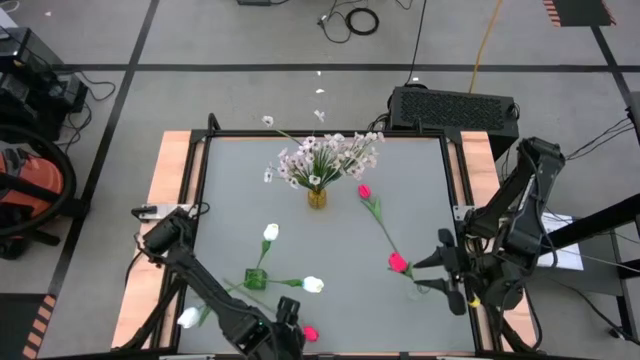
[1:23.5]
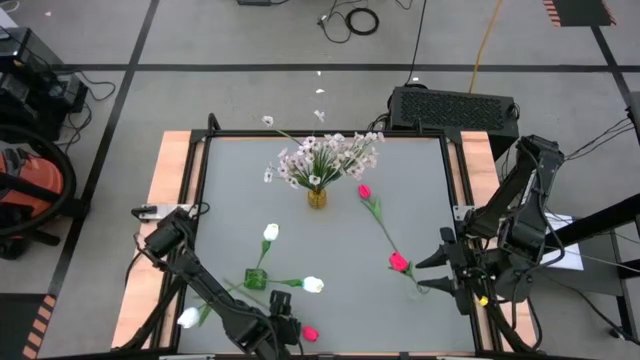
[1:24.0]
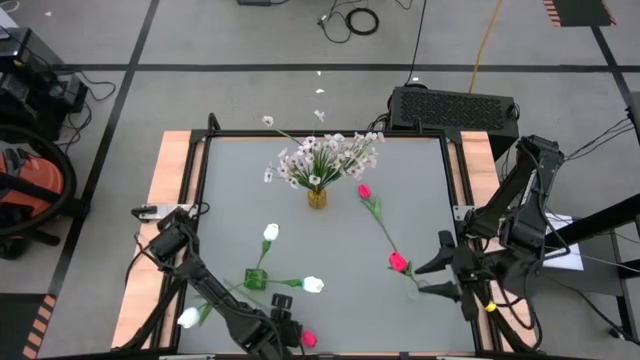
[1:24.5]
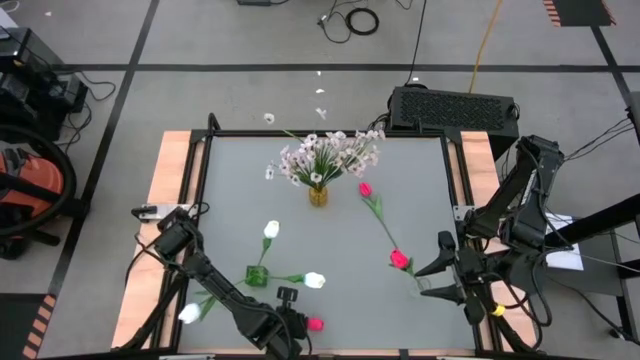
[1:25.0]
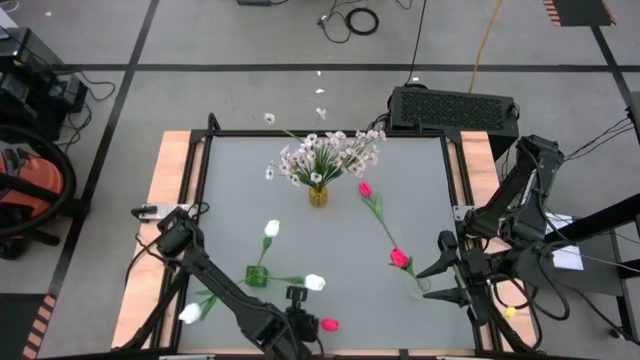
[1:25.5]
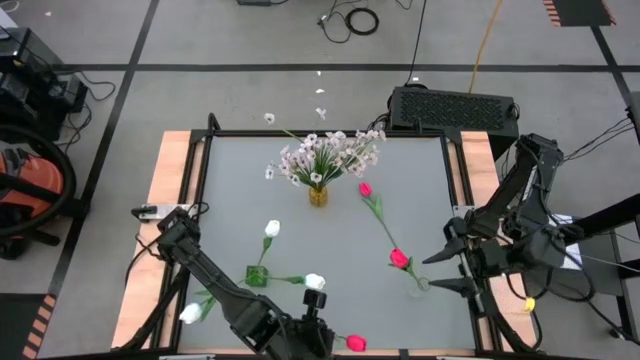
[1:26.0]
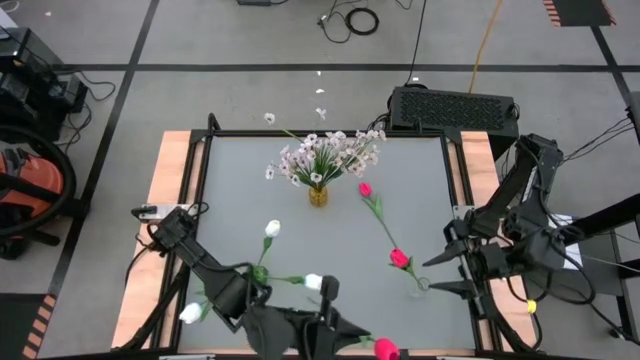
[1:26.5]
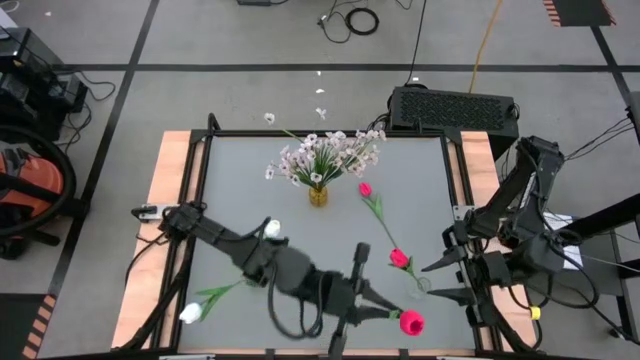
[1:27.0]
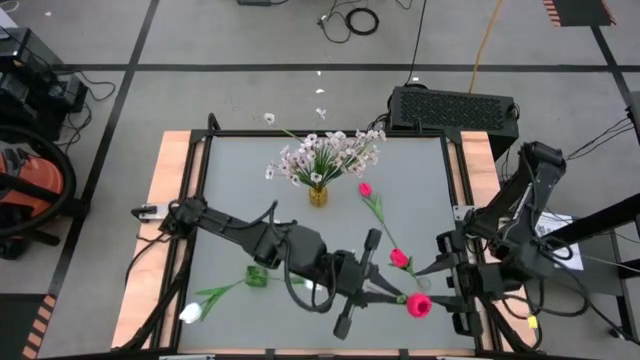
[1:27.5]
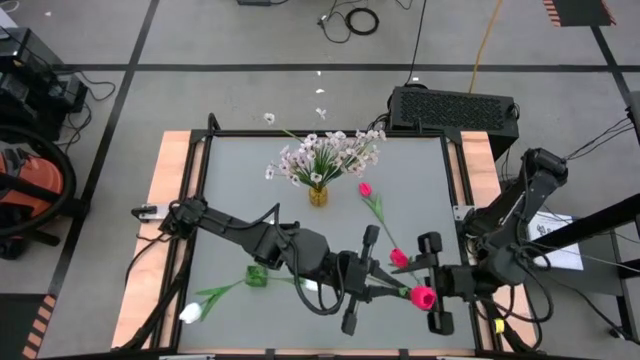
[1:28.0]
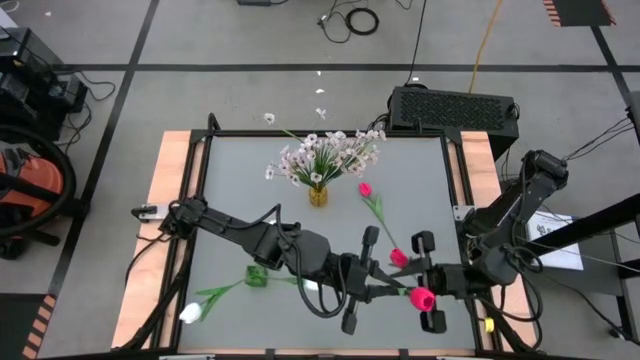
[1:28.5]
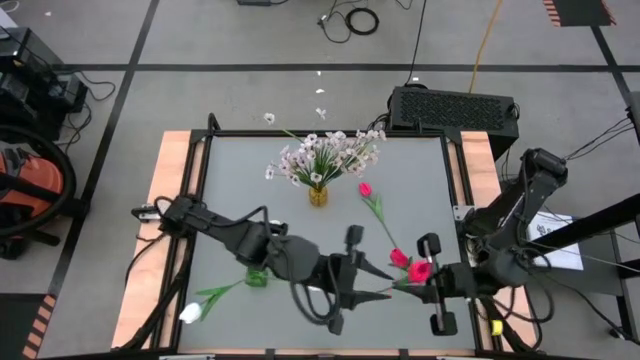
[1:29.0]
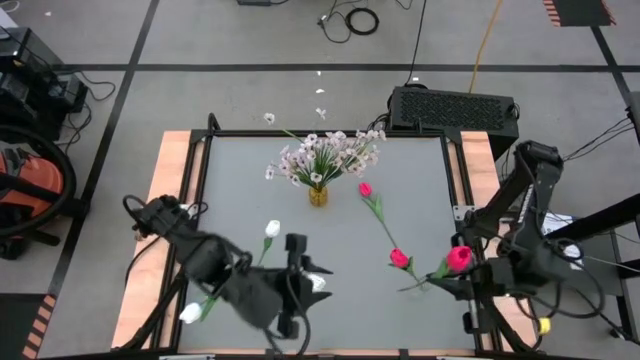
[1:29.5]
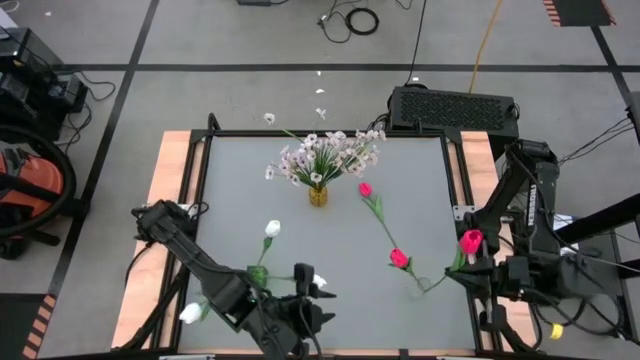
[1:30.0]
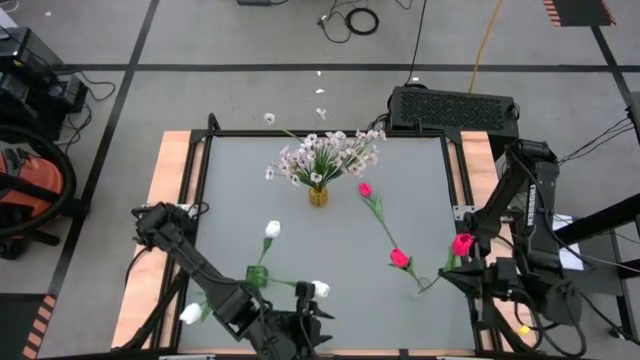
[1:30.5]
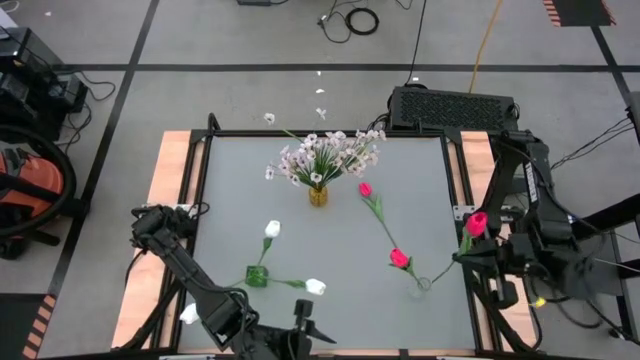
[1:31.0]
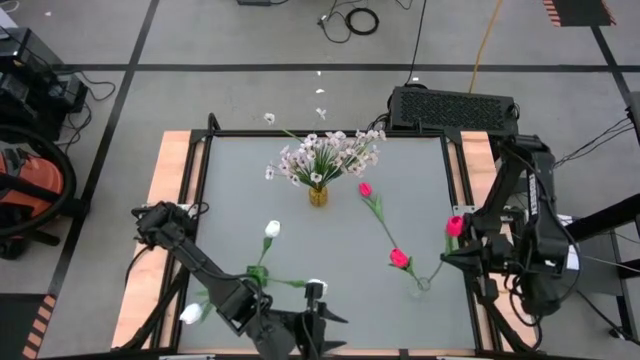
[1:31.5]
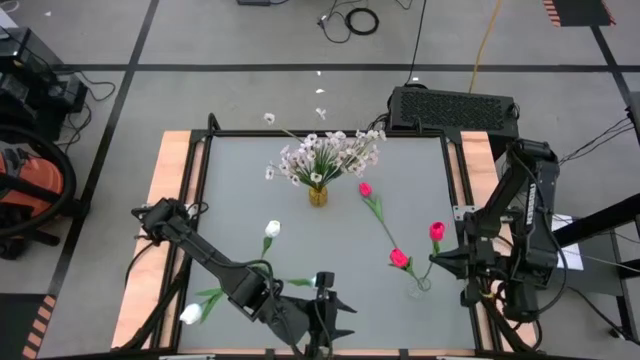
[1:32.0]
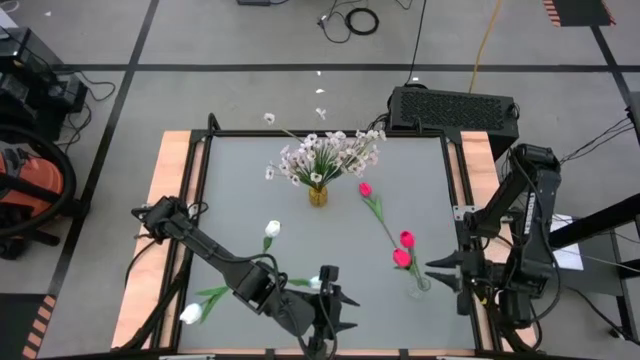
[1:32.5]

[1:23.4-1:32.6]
Task: Sort flowers into vase by color
Put the bottom red flower into the transparent vase

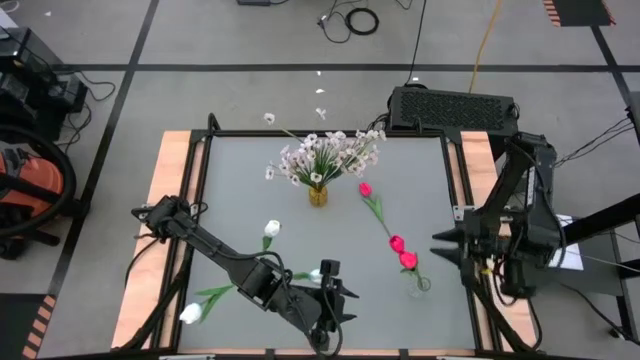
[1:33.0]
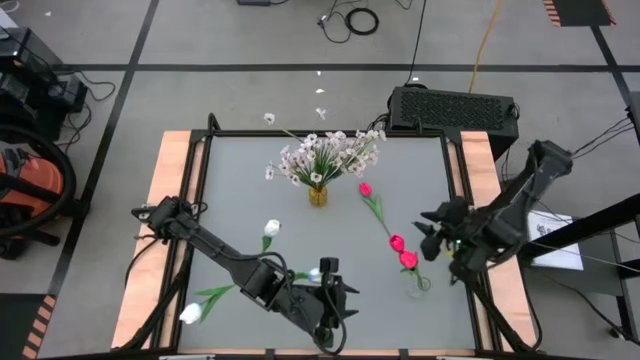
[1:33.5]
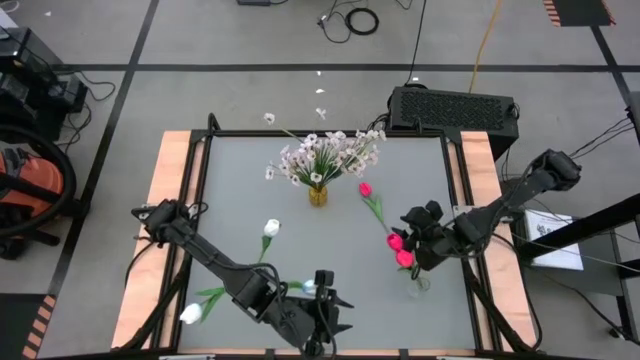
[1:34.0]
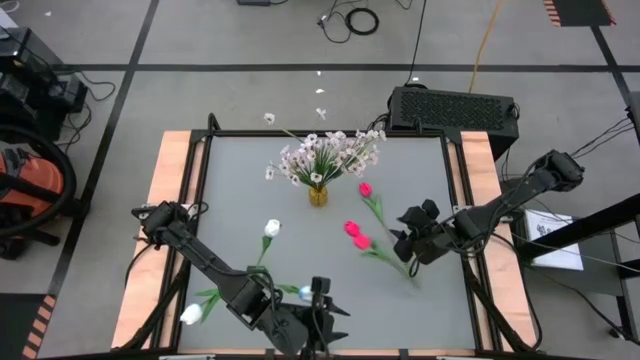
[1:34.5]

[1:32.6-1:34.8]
Put the red flower into the transparent vase

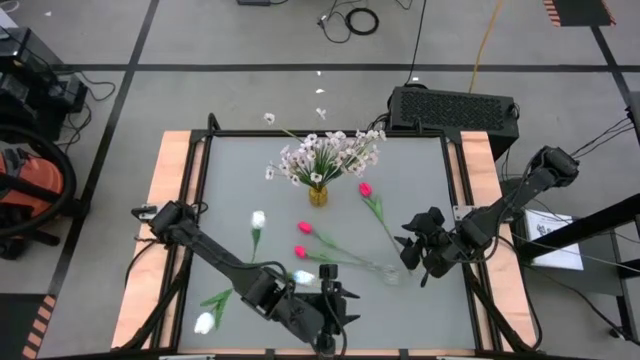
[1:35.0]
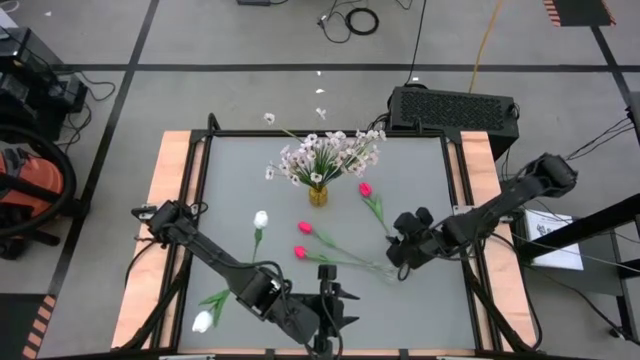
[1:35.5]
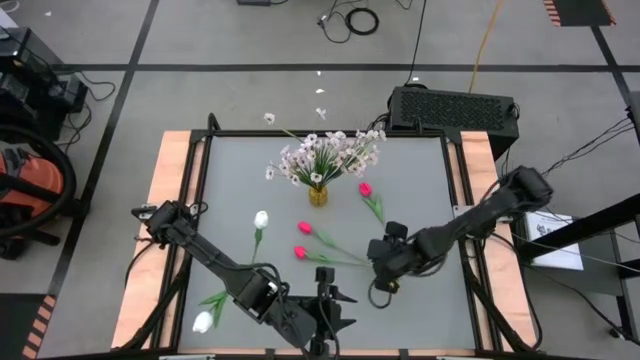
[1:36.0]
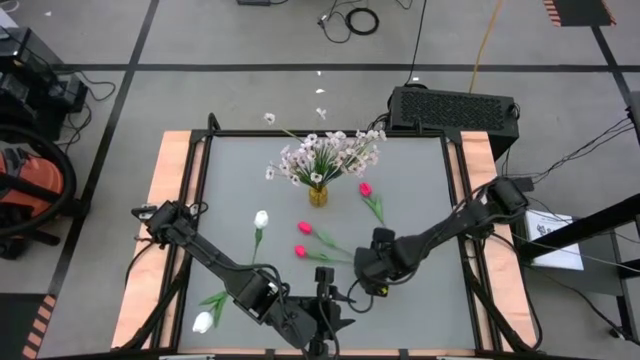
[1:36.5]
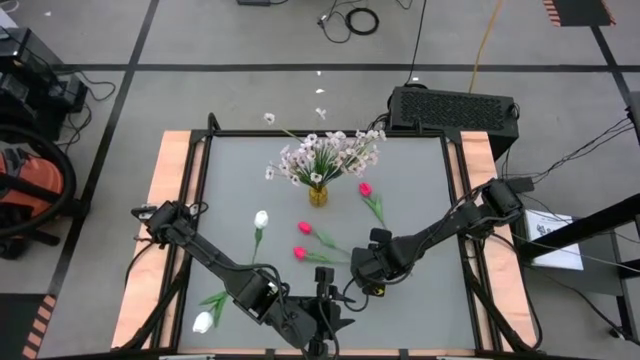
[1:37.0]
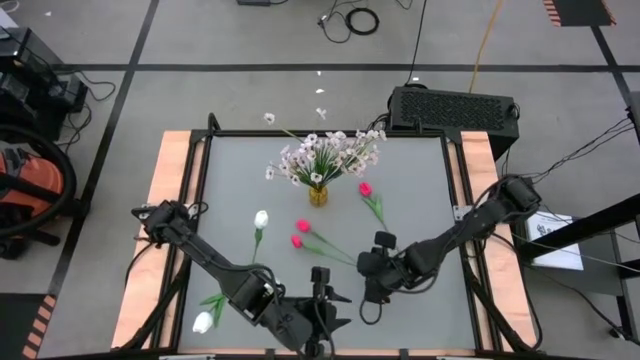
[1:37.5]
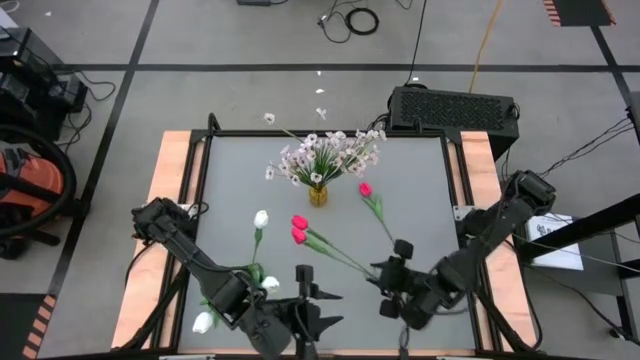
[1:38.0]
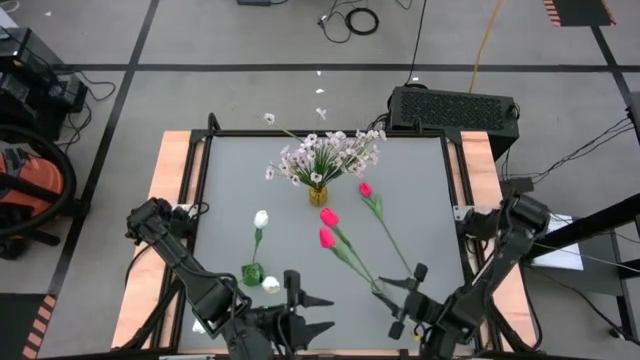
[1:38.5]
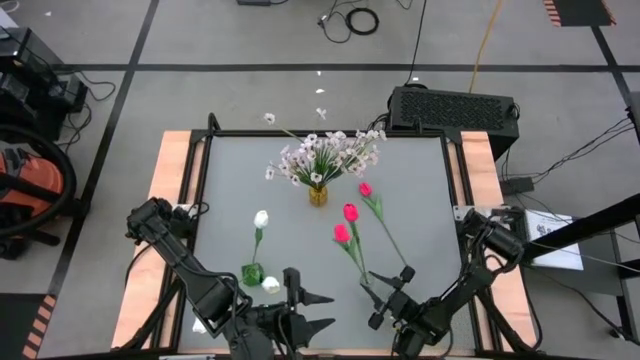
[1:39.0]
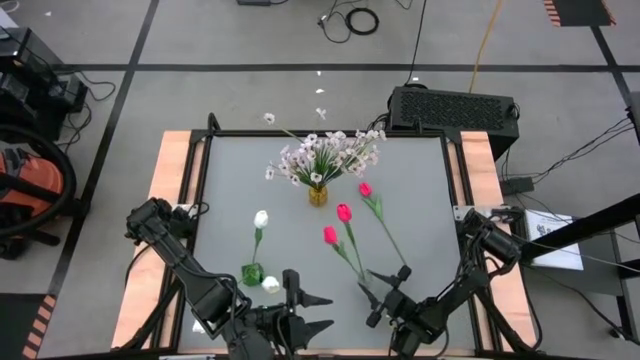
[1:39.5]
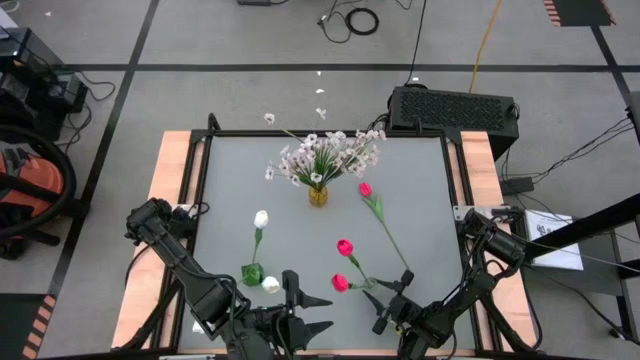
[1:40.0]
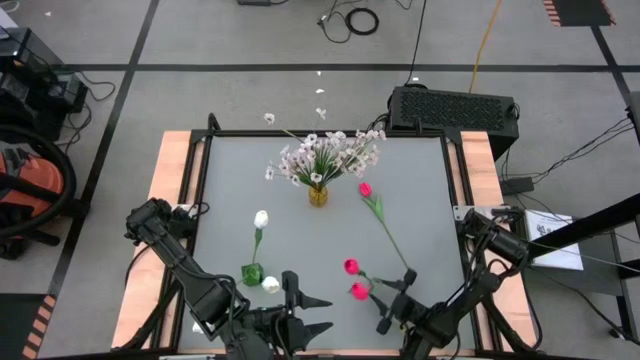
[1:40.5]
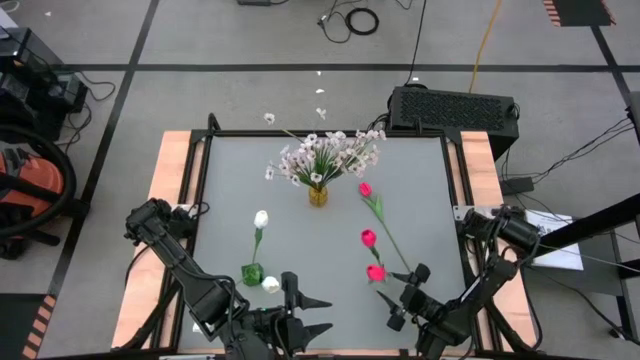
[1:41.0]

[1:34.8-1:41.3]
Put the transparent vase containing the red flowers on the middle left of the table upright

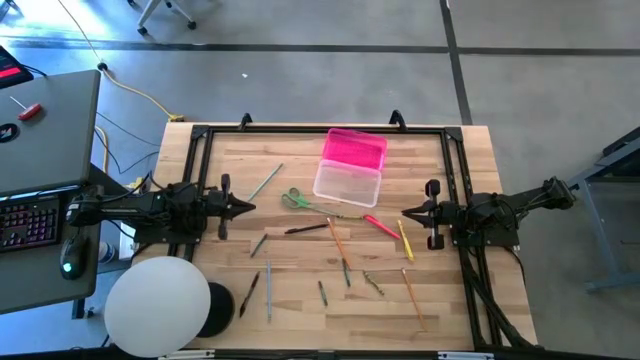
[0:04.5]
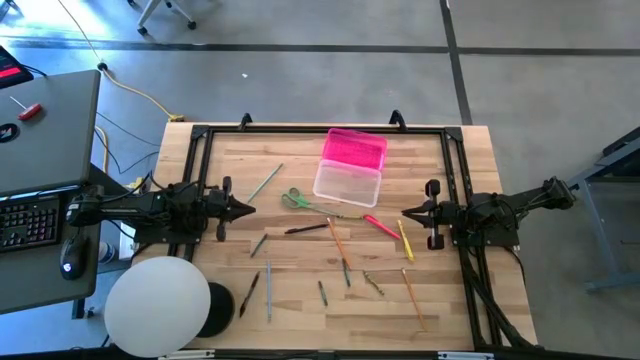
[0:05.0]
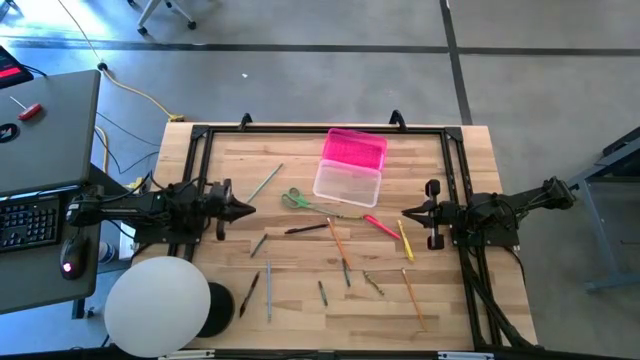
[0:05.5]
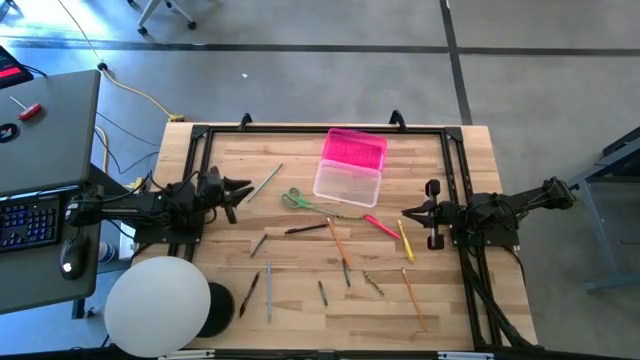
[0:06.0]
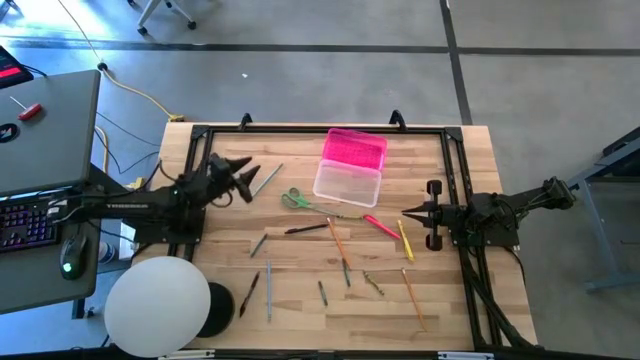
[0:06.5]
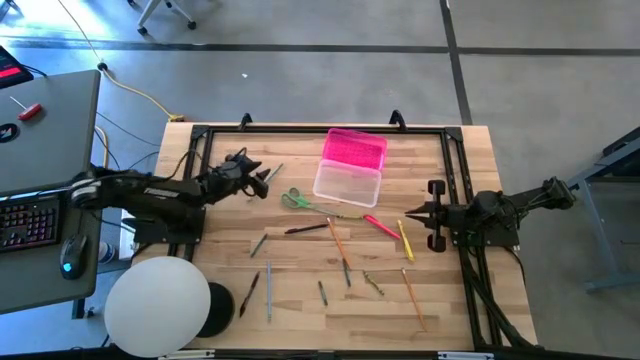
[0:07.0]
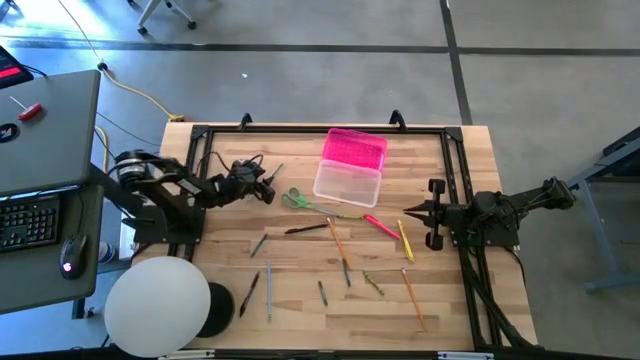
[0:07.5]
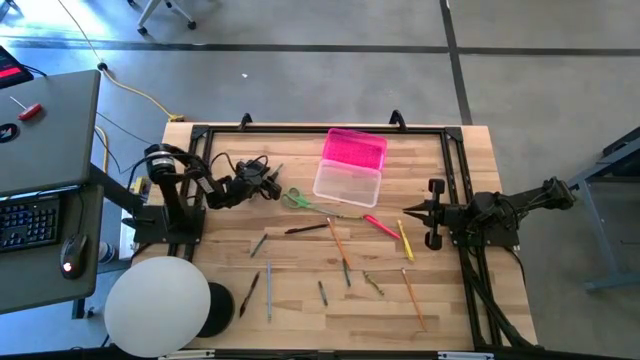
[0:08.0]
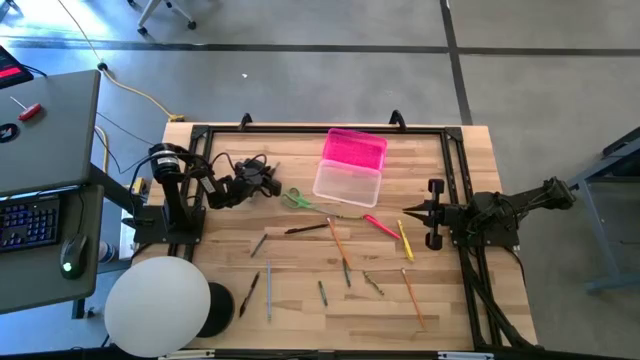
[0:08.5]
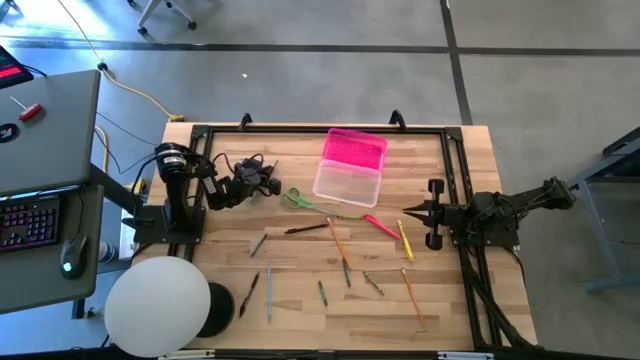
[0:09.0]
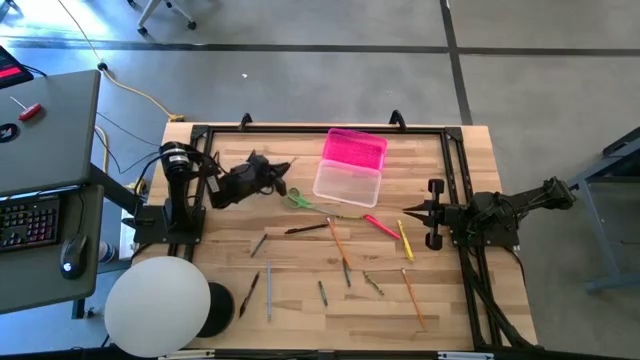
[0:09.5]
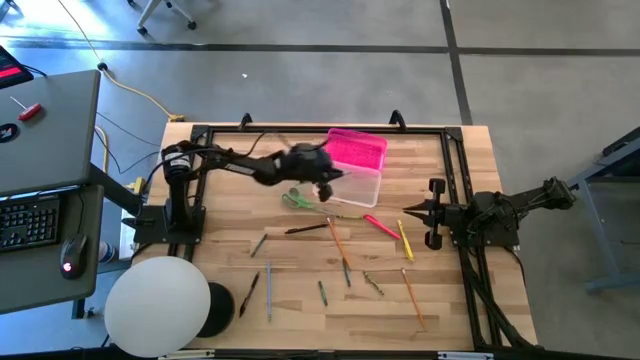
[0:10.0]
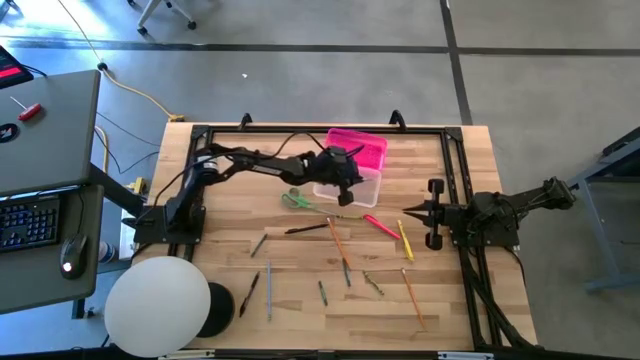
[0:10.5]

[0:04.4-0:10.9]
Task: Pick & place school supplies into a supply box
Put the top blue pencil into the supply box
